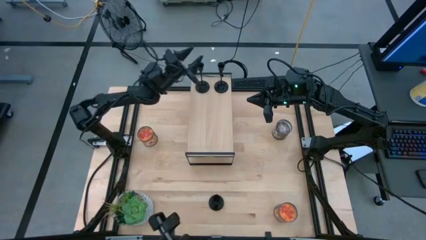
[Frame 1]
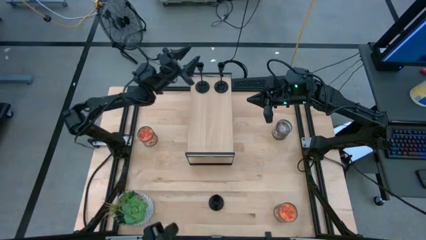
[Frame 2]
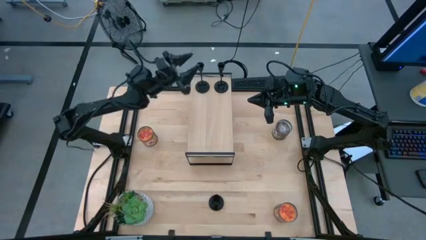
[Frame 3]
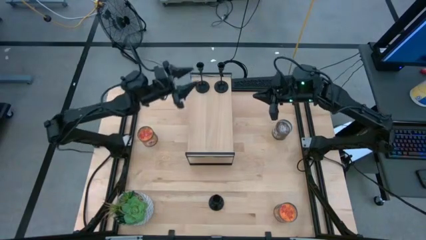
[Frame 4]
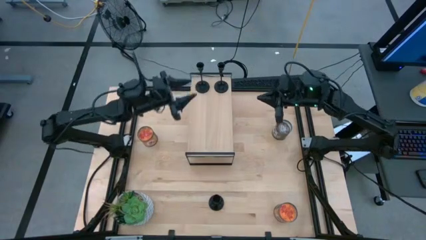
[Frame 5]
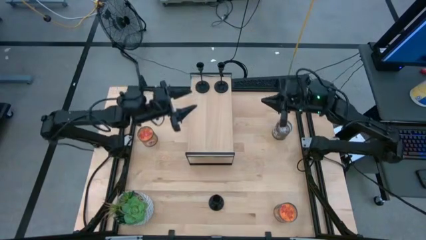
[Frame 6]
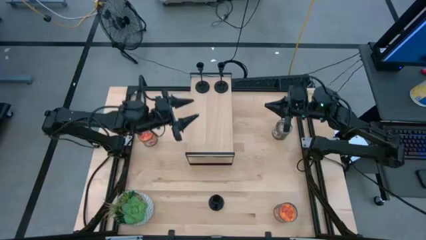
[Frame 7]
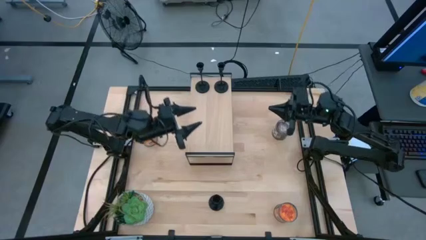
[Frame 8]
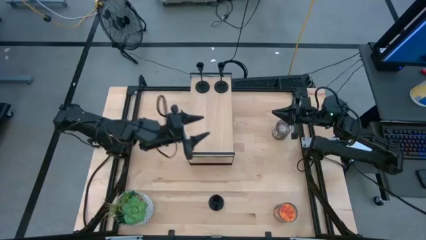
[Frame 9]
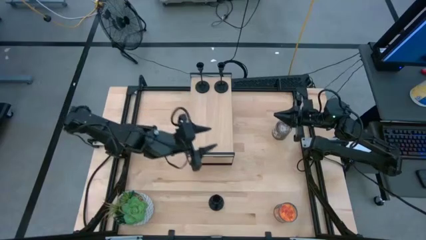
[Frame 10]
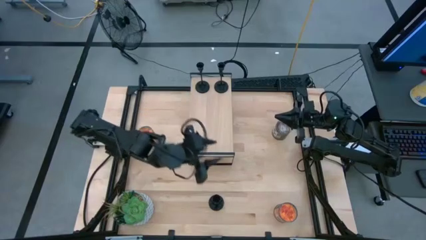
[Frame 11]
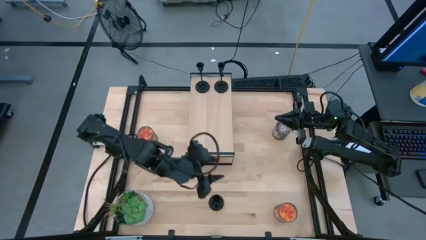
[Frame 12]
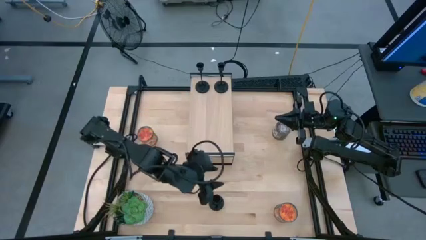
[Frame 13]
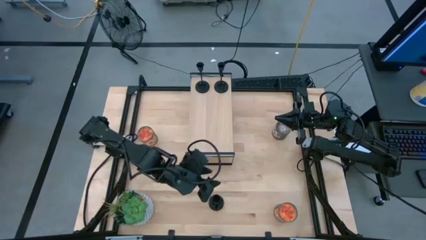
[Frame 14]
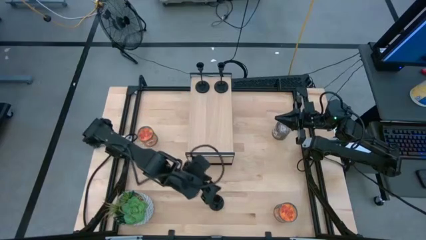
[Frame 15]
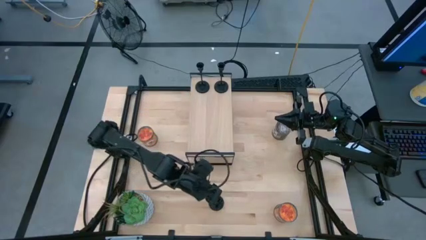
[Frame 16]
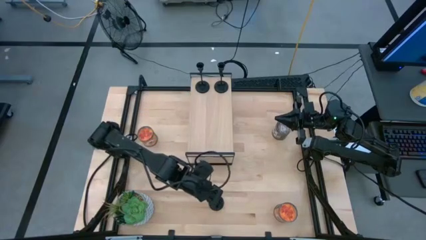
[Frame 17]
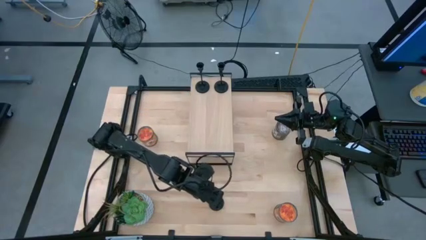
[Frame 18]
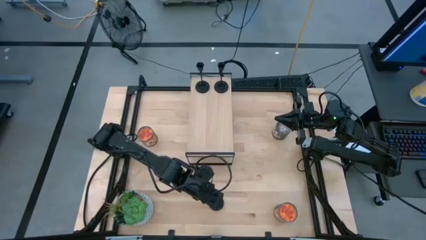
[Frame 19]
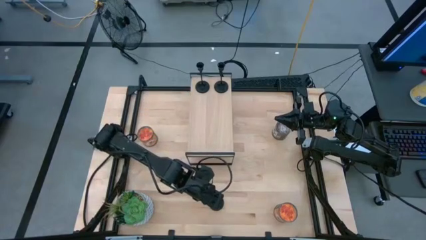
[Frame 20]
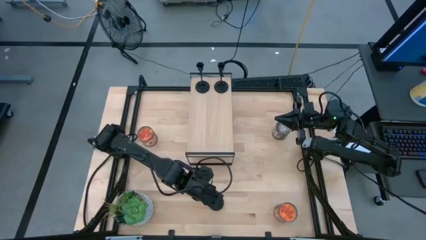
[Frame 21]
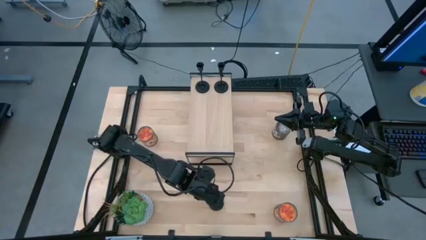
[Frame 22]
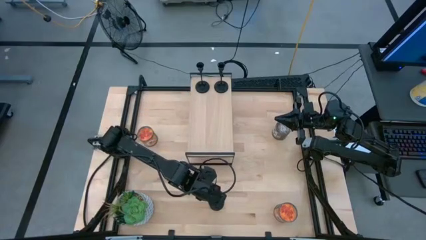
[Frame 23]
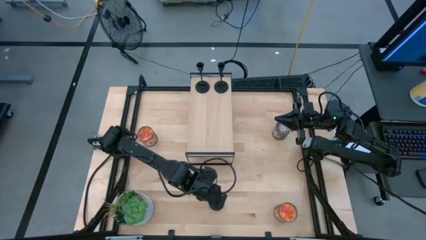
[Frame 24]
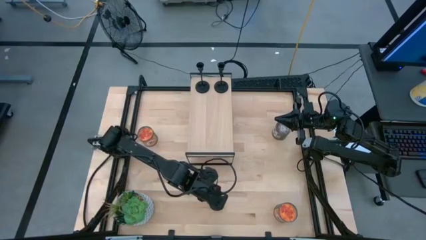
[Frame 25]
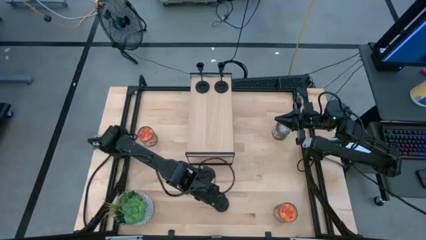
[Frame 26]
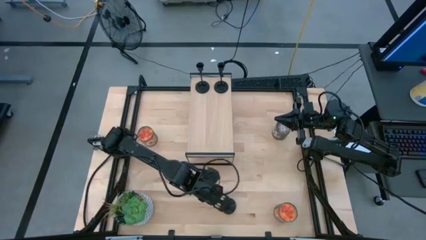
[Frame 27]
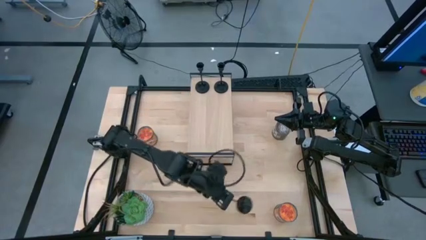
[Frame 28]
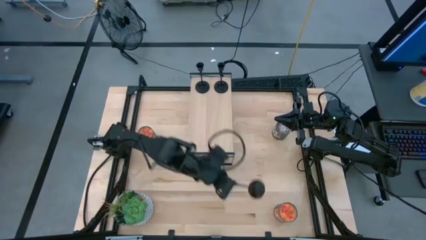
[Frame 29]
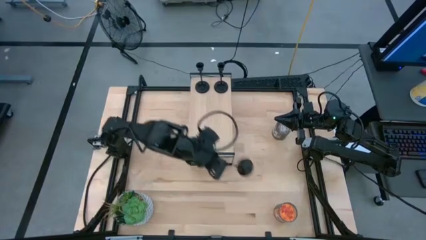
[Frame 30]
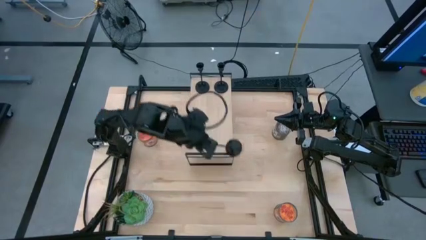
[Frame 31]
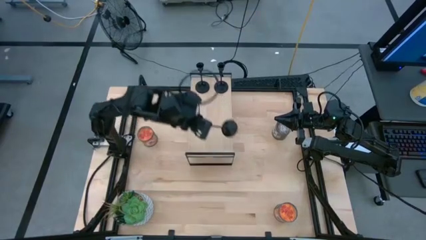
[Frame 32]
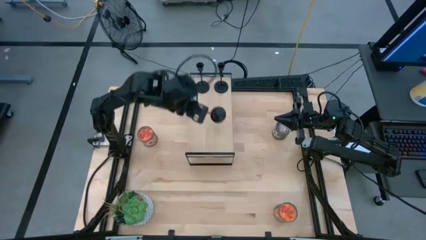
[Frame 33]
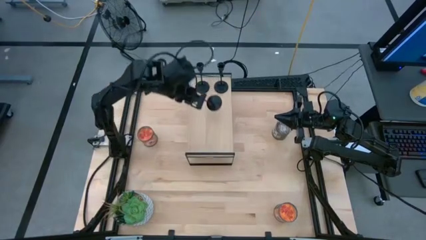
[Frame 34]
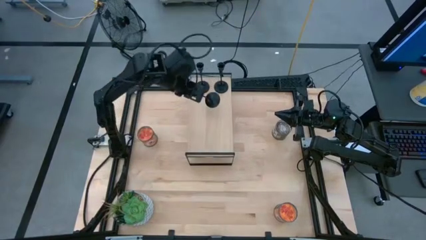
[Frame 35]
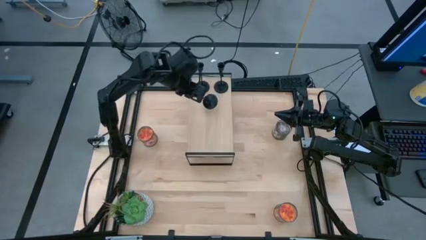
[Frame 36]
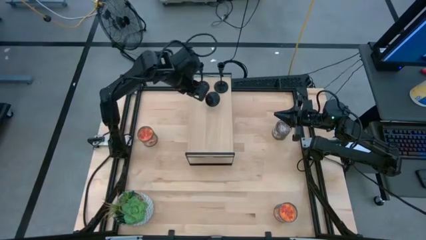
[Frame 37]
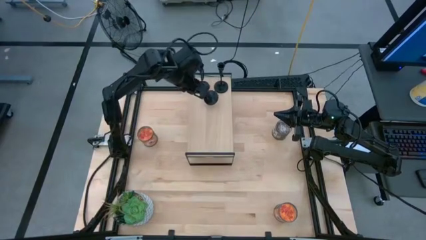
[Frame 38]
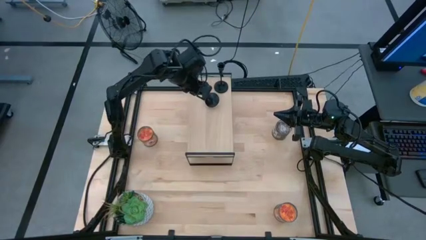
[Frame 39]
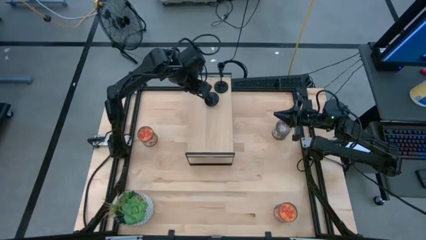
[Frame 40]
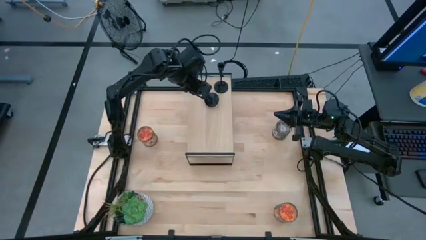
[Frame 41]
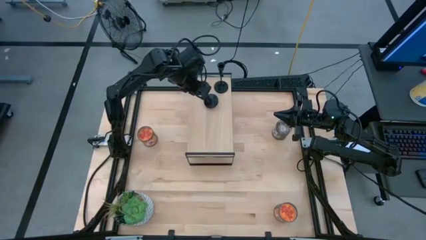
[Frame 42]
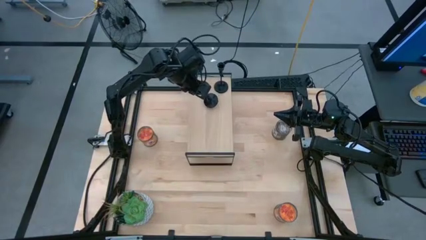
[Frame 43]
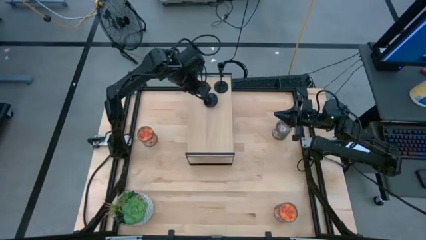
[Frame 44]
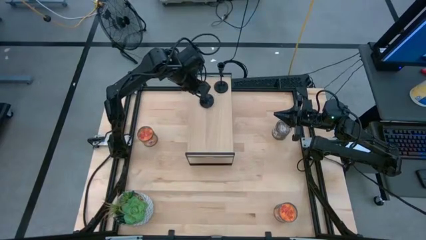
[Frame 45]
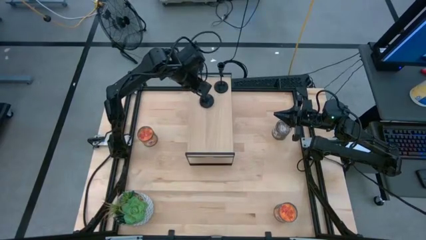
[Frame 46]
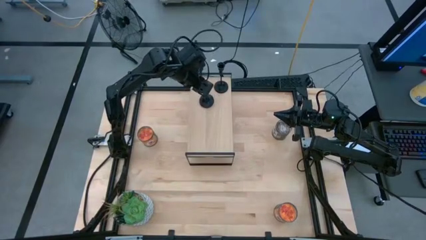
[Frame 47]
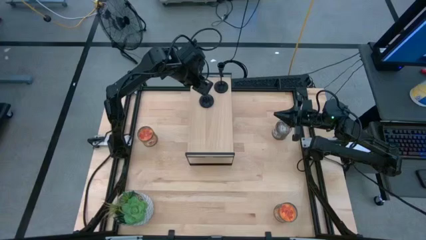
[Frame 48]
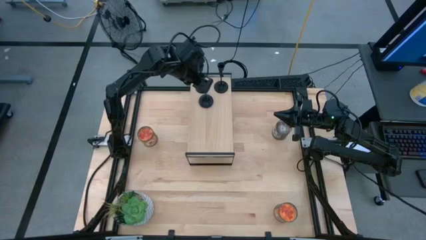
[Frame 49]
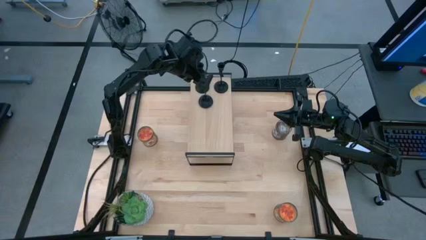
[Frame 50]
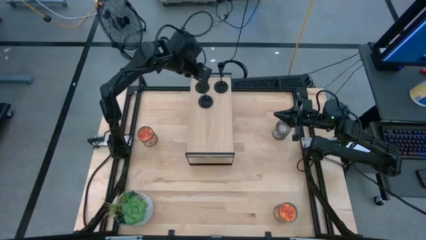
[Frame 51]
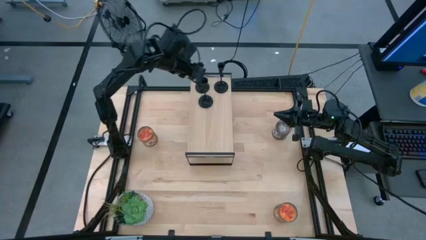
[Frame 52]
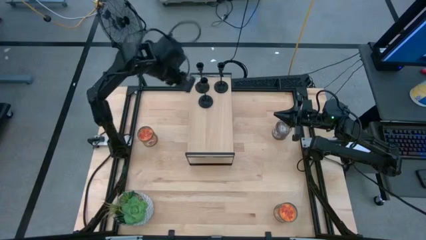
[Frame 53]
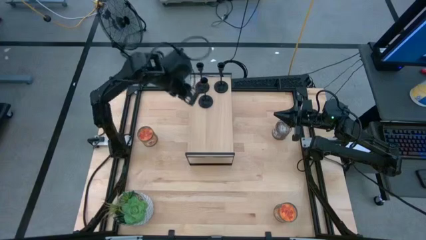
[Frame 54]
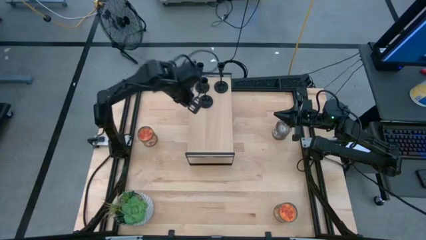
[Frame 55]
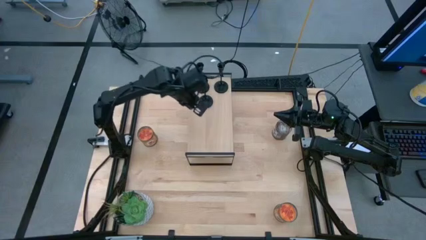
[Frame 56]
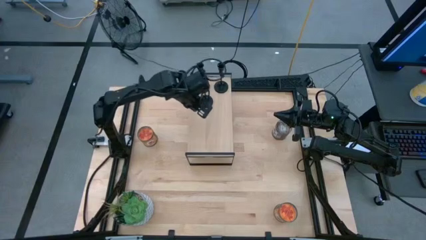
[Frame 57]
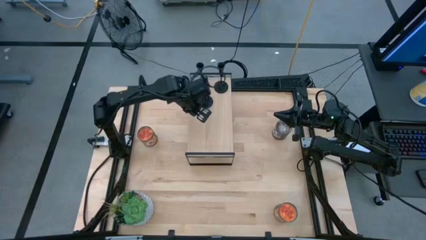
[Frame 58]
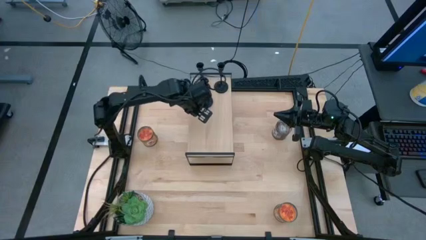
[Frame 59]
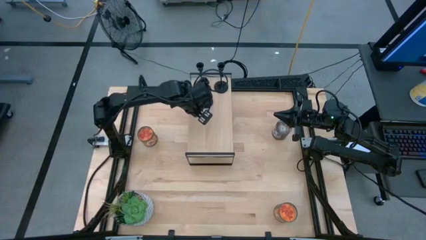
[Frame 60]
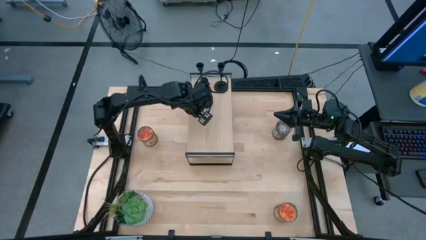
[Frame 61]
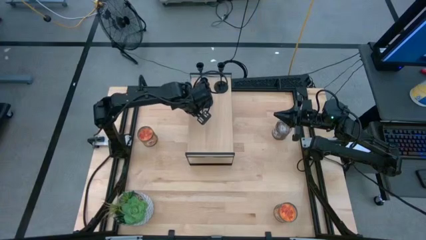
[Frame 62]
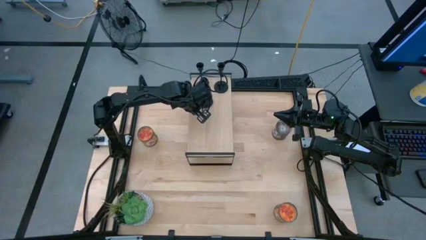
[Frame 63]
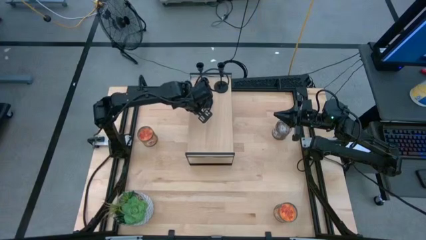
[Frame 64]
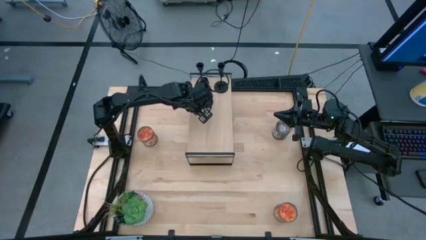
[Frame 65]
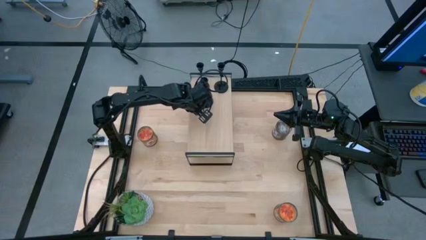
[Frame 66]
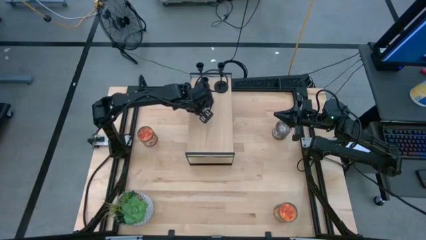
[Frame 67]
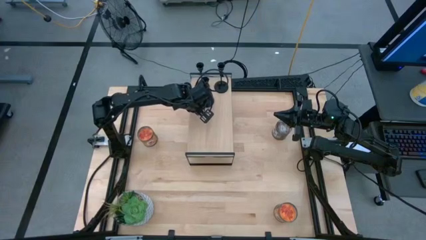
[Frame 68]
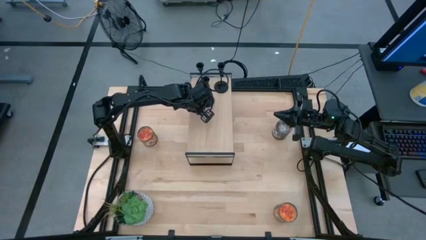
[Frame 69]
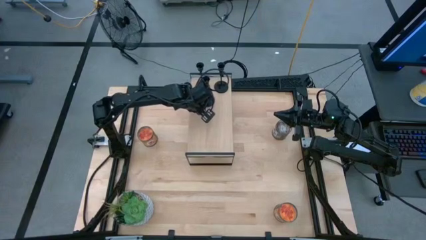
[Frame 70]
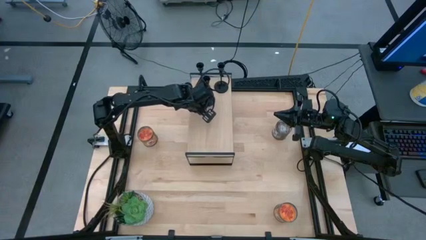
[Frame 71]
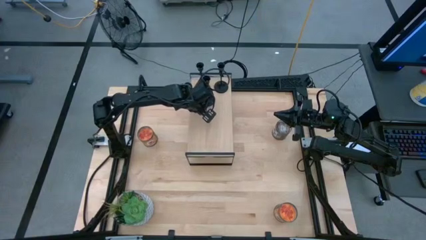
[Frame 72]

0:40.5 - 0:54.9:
Task: Pick & Place candle stick holders
Put the black candle holder on the shelf

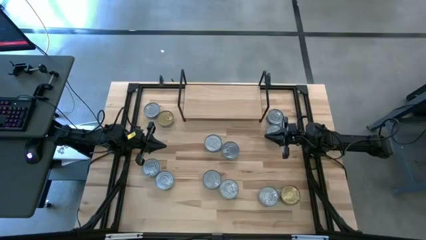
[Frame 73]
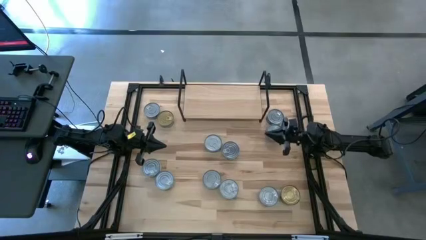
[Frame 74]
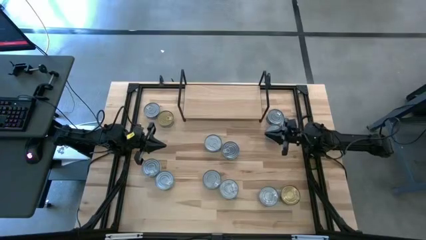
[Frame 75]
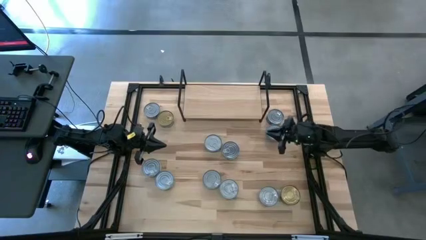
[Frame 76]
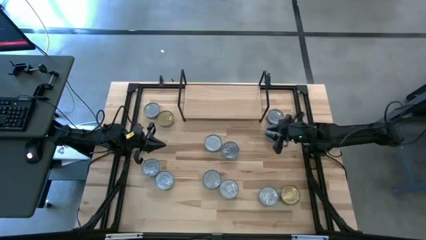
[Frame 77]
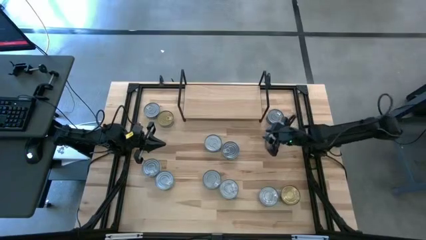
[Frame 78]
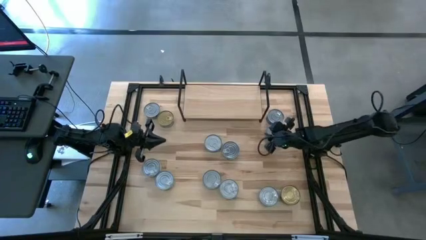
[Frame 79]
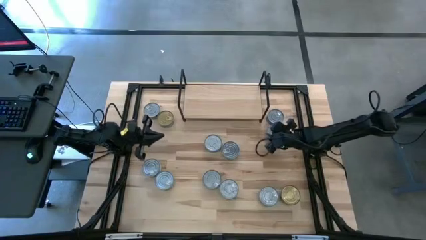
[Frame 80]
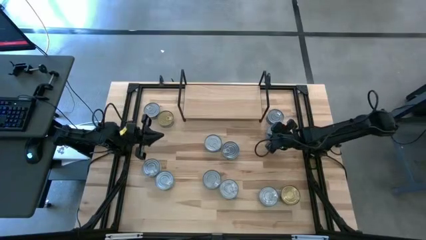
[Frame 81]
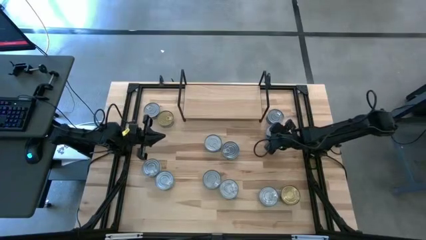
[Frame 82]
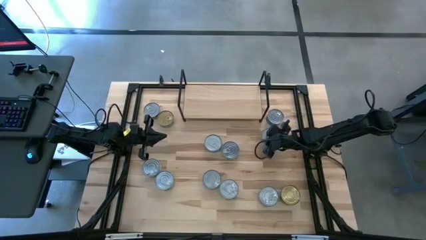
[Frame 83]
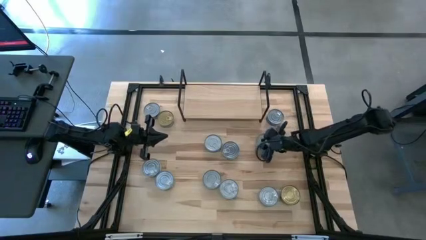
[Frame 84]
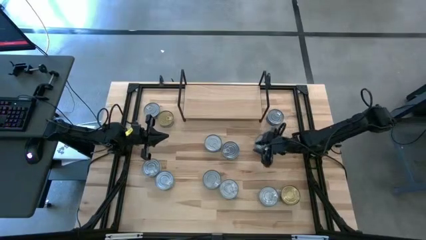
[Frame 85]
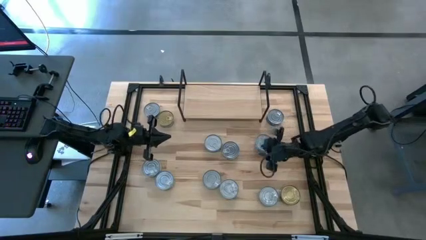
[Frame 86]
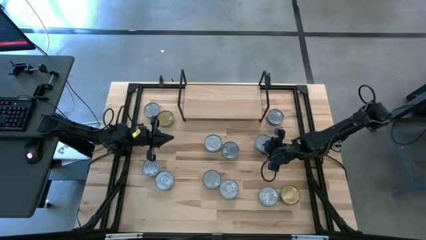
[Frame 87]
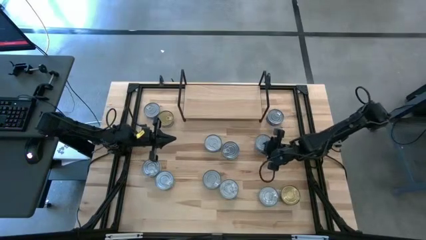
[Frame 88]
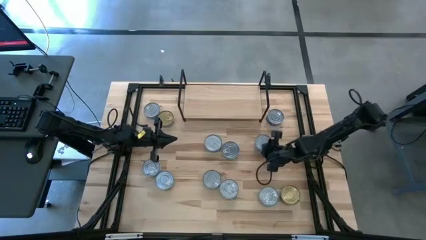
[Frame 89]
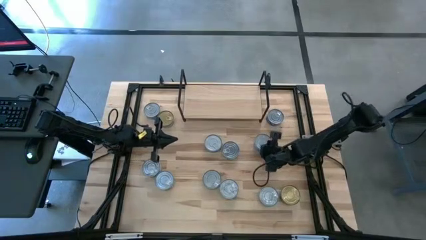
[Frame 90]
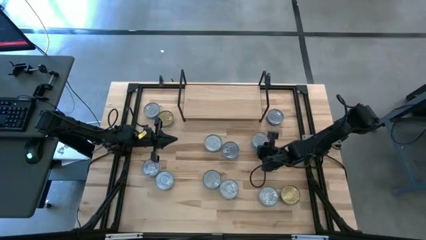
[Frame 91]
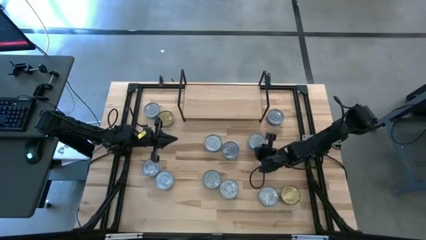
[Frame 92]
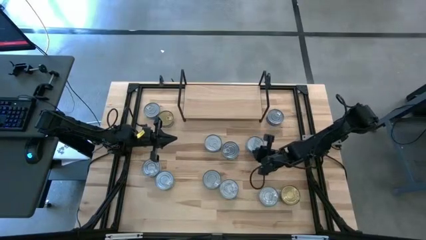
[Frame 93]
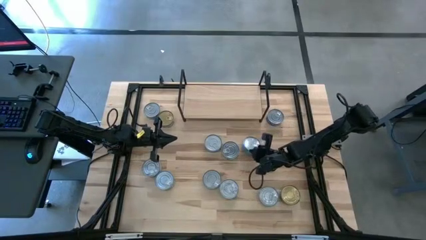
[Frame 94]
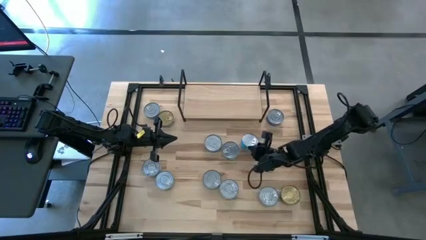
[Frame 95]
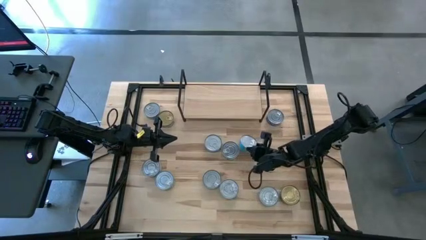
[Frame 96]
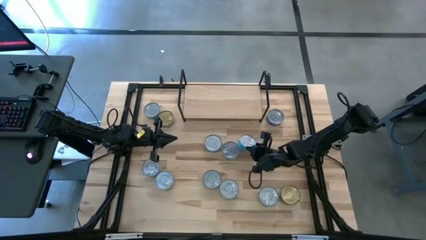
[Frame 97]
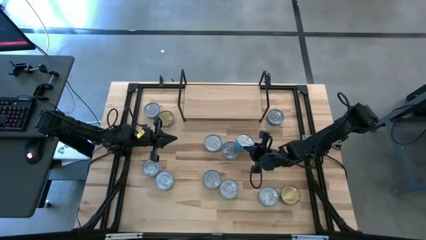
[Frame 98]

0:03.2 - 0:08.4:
Task: Stack canned seafood by type on shelf
Put the yellow-blue tuna can on the shelf
